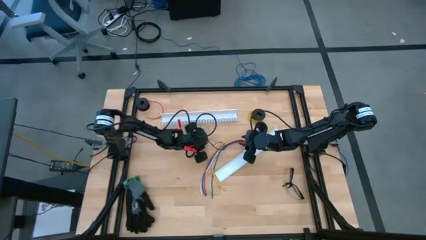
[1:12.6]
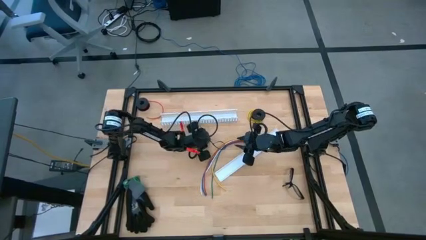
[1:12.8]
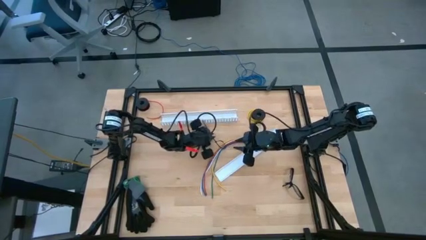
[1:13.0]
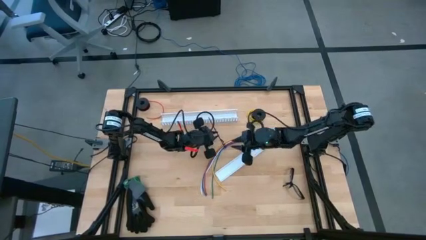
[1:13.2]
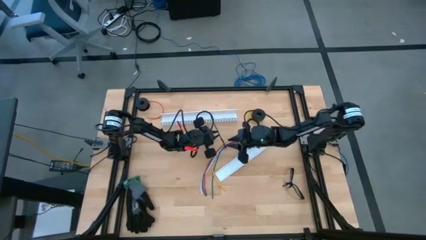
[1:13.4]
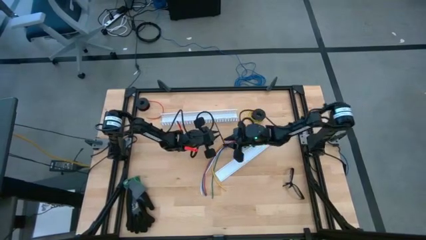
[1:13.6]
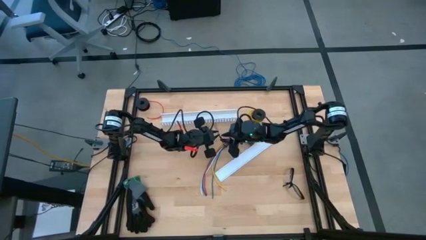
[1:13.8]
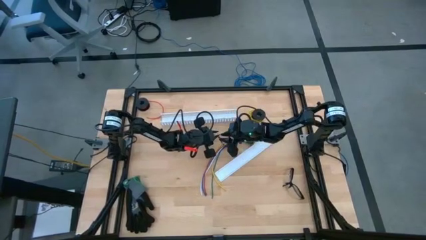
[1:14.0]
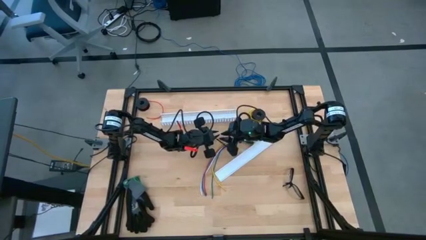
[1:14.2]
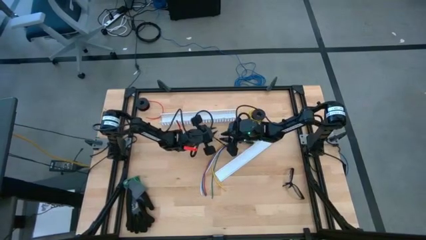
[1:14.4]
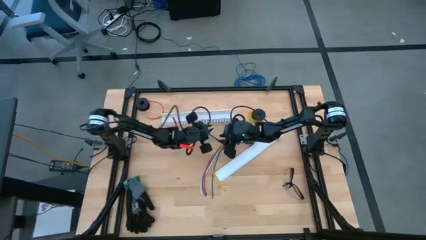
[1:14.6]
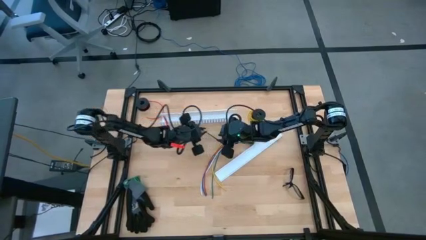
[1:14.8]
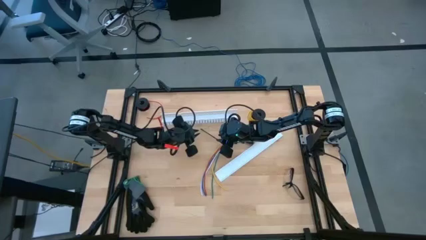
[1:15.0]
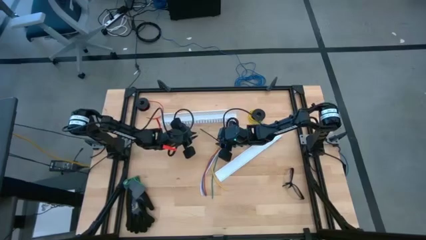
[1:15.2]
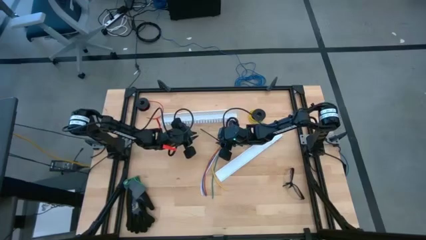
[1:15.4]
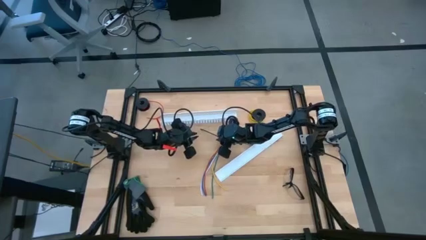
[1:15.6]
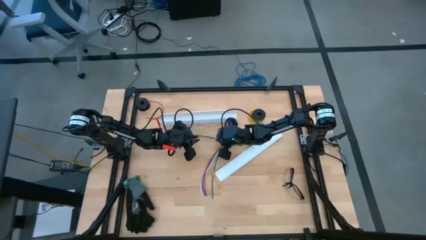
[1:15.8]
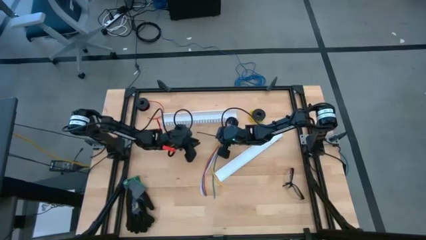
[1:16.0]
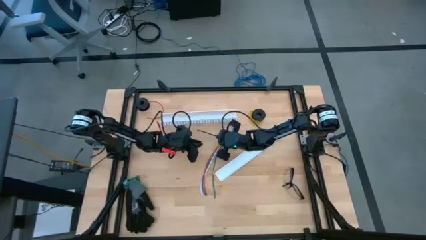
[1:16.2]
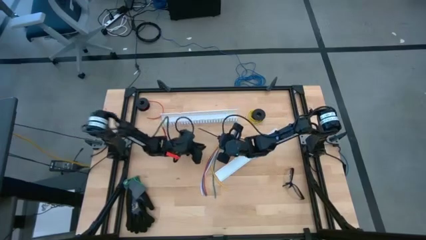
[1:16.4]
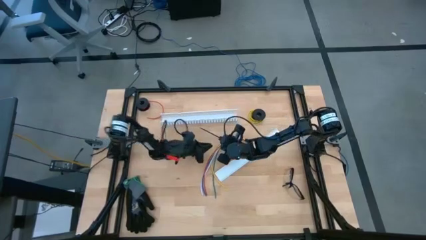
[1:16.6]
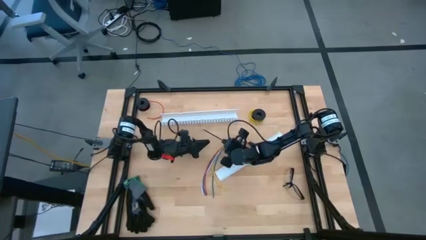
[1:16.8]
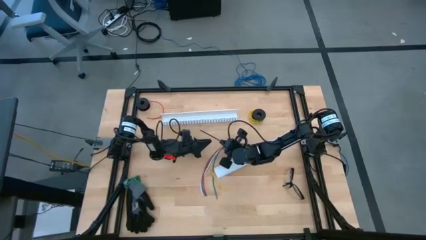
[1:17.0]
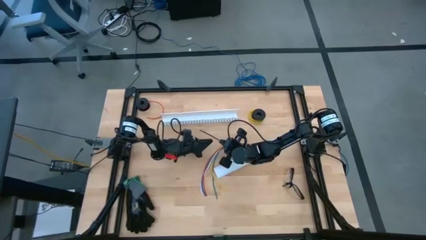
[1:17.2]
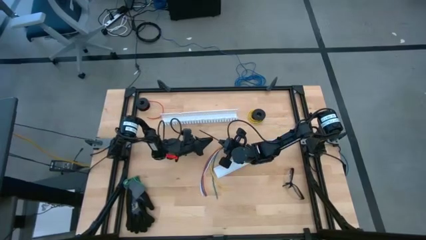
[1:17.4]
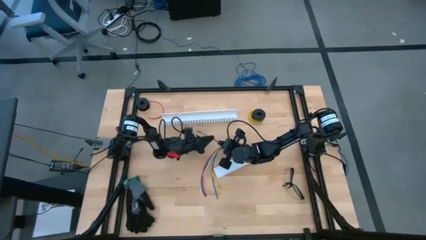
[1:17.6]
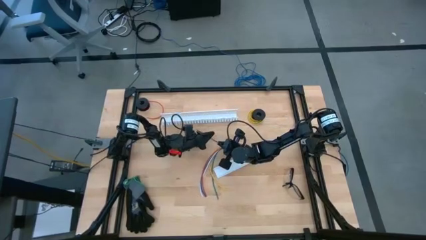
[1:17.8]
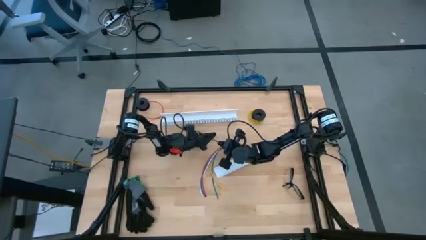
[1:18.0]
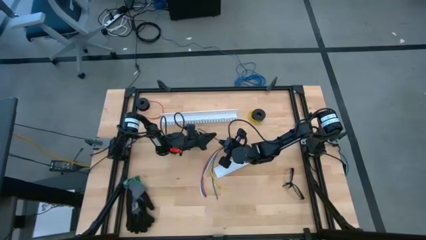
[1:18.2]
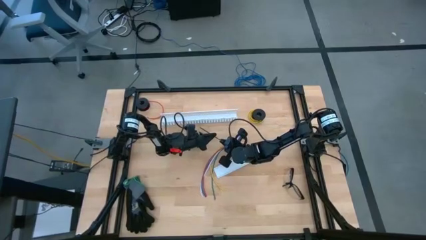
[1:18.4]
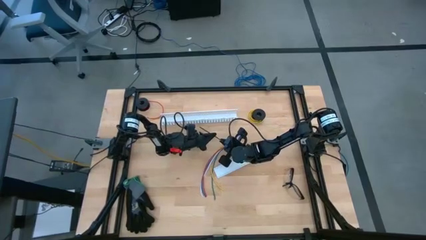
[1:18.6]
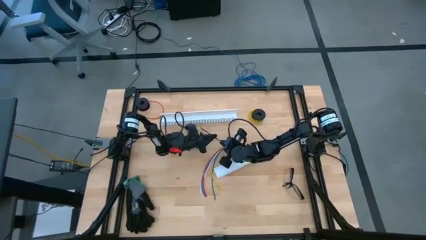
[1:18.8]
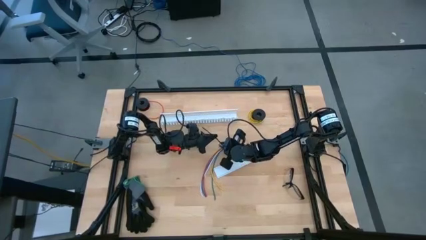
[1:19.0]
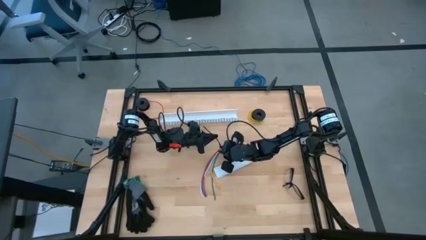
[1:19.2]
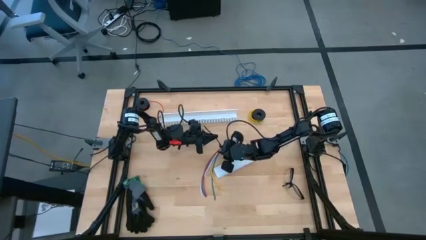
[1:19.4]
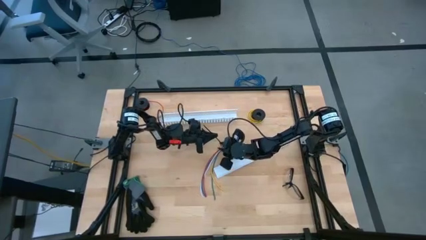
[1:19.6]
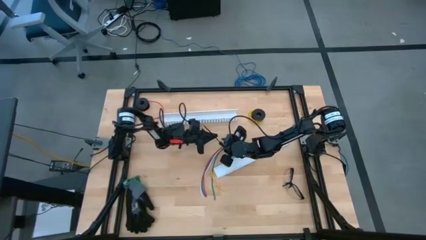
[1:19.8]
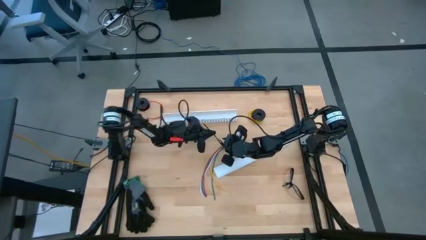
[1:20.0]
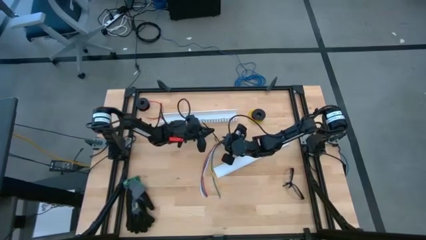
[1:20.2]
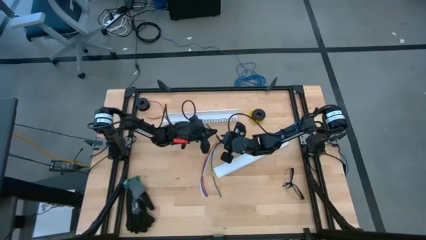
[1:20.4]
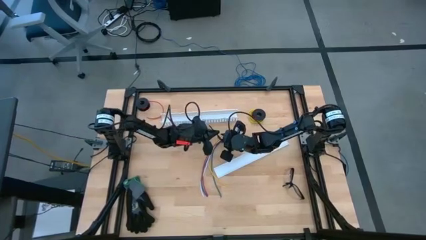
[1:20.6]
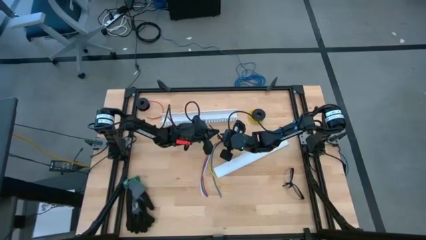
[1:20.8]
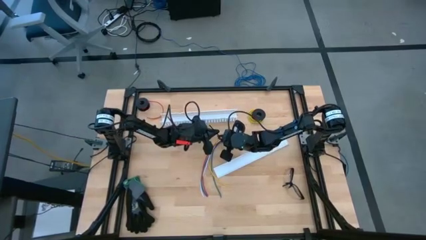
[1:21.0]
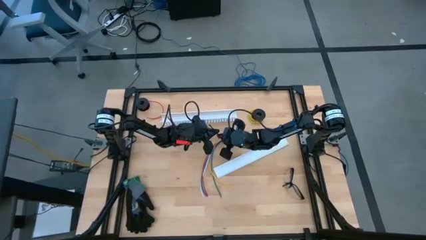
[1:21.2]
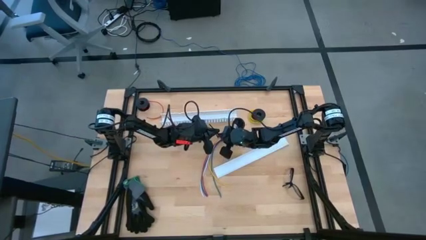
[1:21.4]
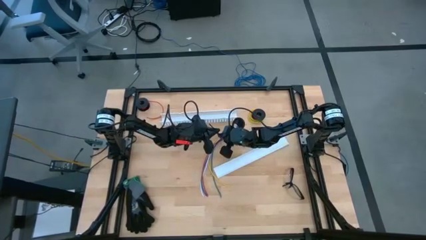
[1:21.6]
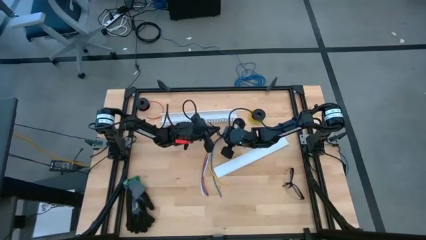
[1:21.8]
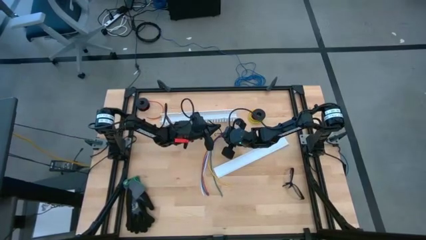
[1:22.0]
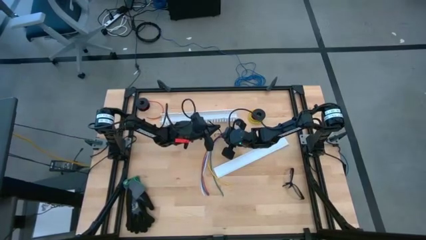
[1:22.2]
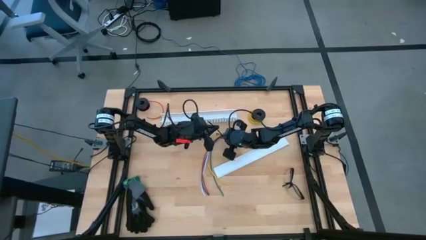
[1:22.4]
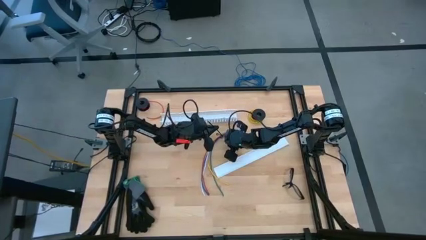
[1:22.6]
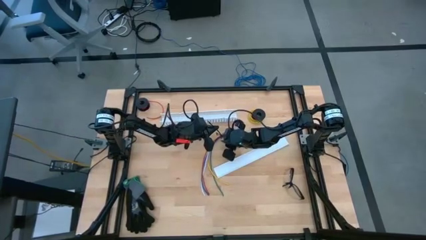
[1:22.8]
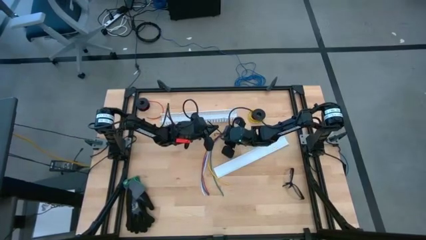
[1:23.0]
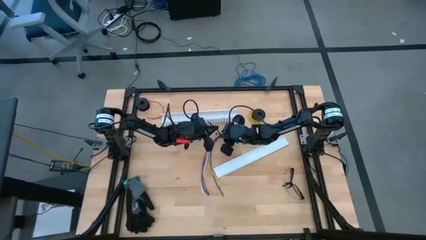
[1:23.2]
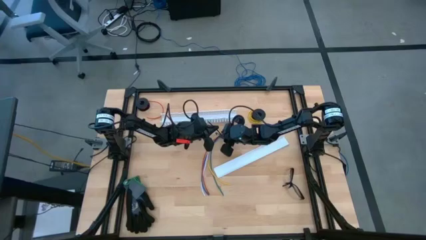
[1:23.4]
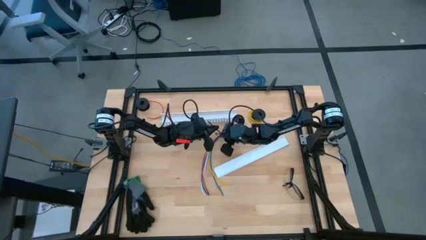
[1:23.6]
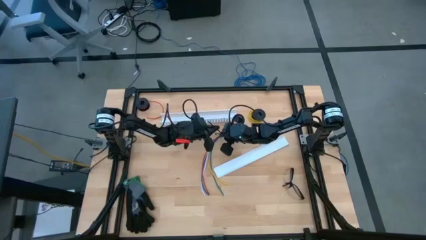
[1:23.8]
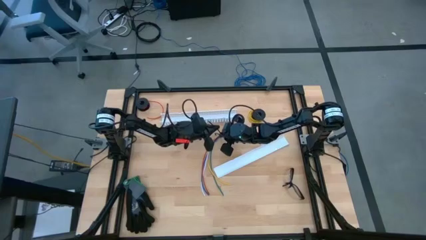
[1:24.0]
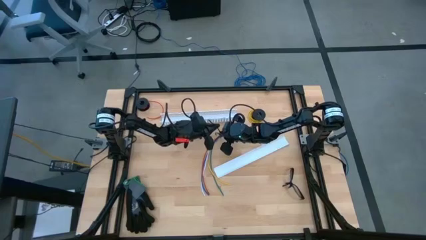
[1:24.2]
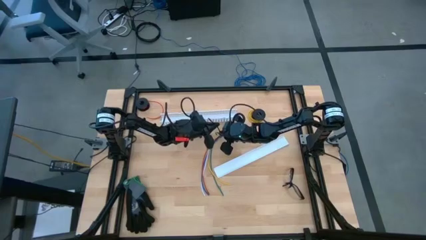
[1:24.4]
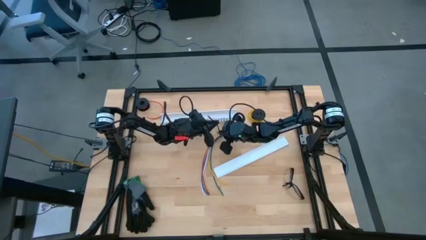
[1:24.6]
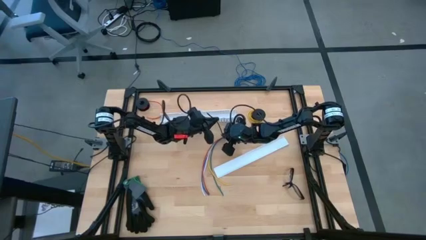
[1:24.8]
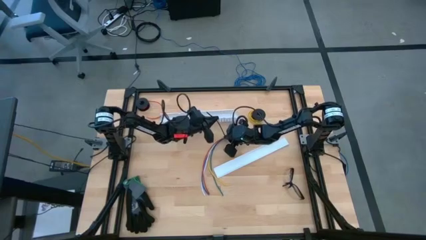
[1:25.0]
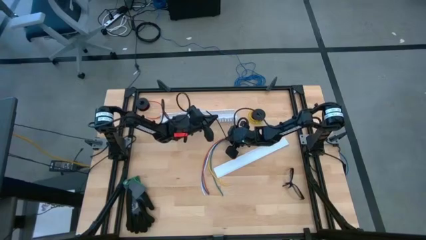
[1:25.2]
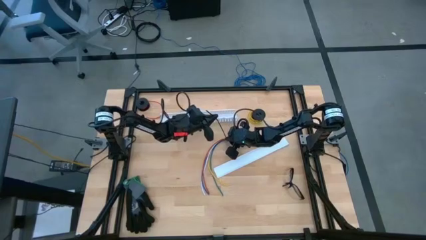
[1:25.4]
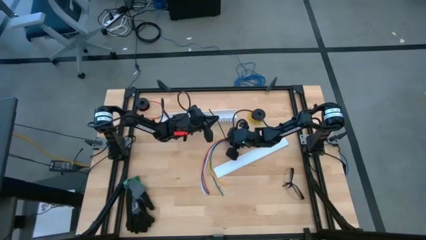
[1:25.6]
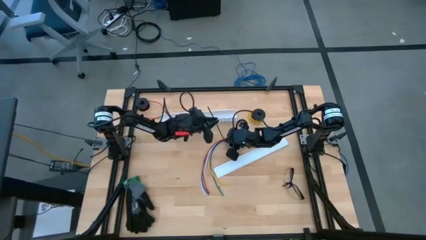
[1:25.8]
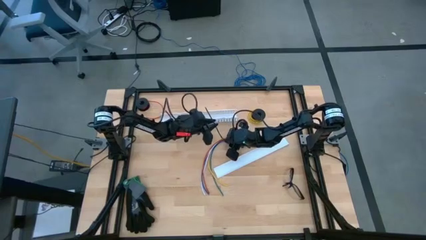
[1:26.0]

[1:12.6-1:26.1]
Task: Ziptie cables
Wrap the cables together using the black zip tie
